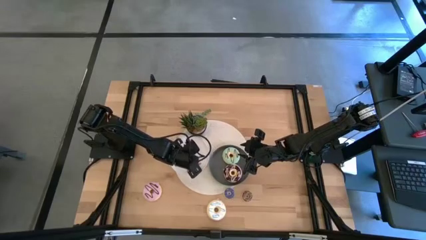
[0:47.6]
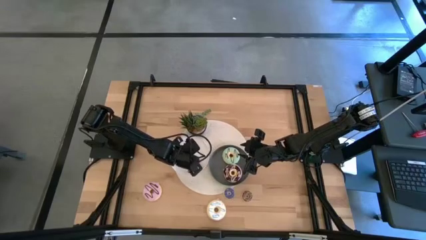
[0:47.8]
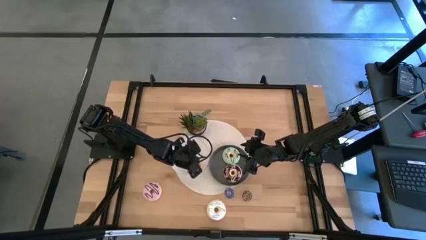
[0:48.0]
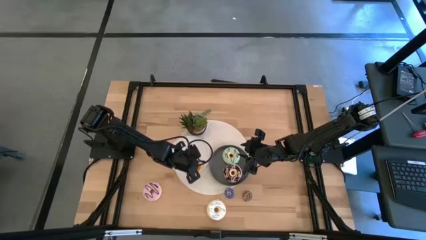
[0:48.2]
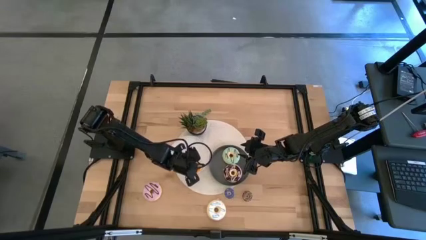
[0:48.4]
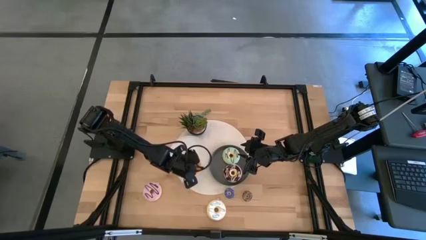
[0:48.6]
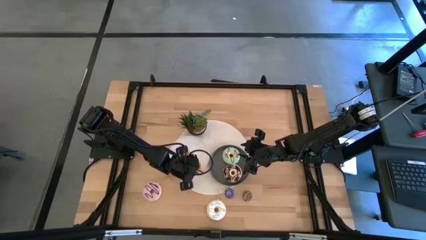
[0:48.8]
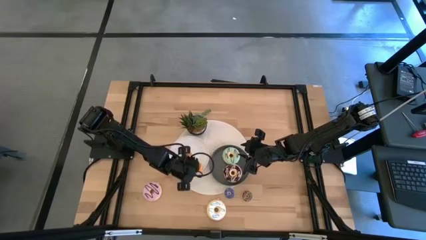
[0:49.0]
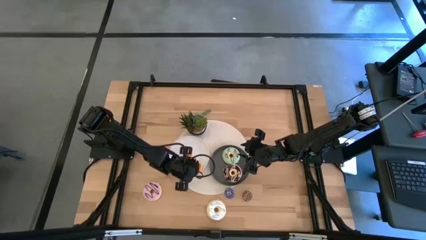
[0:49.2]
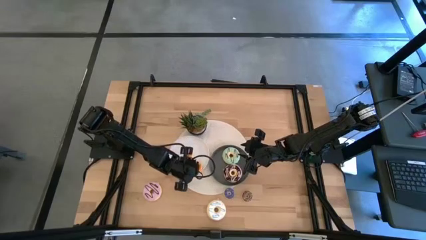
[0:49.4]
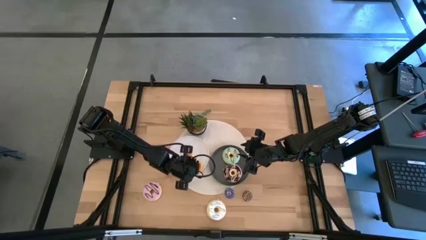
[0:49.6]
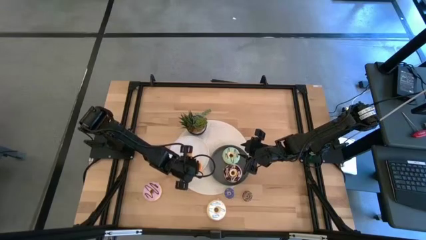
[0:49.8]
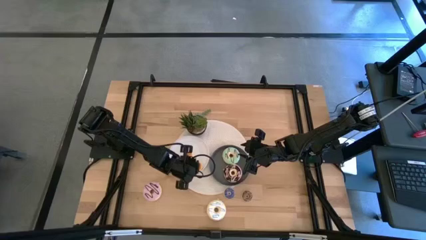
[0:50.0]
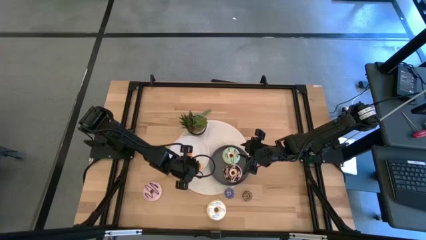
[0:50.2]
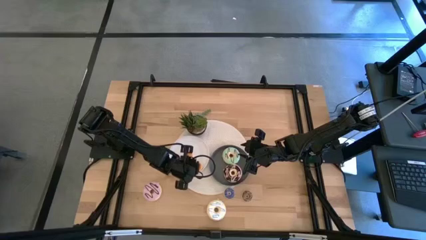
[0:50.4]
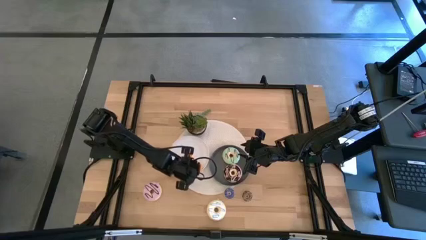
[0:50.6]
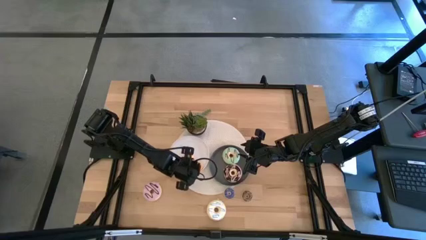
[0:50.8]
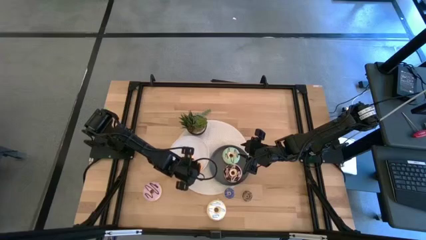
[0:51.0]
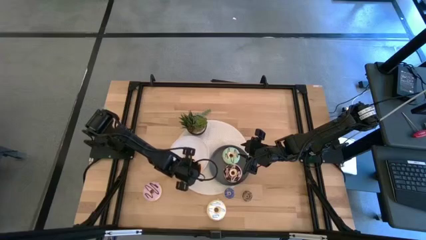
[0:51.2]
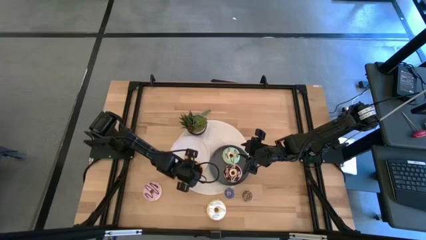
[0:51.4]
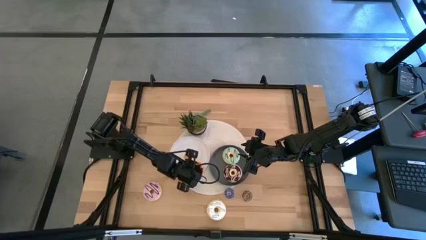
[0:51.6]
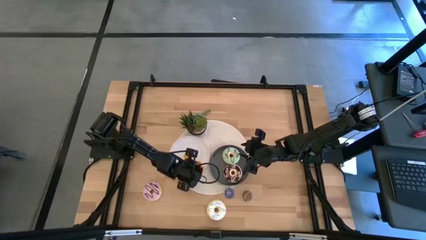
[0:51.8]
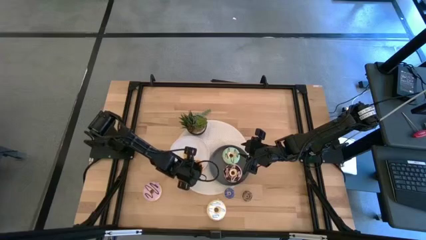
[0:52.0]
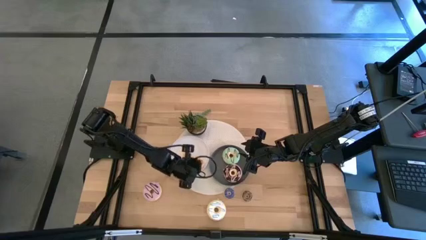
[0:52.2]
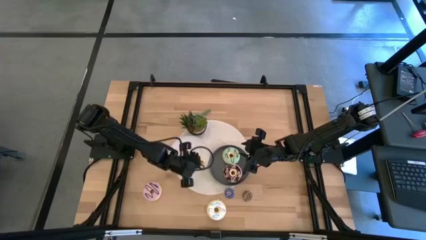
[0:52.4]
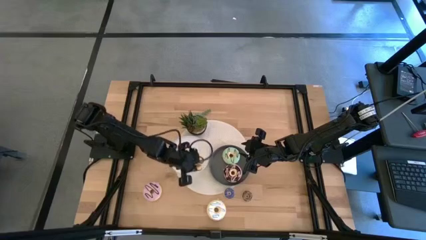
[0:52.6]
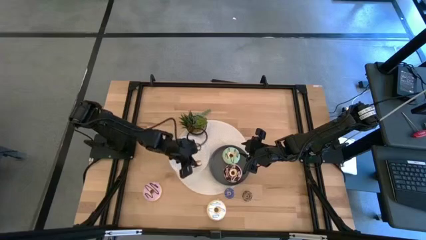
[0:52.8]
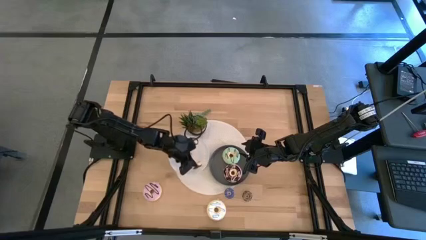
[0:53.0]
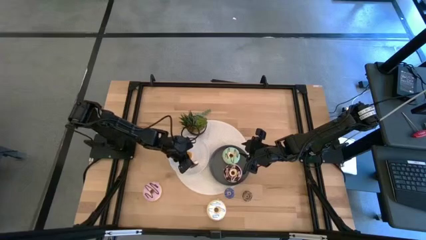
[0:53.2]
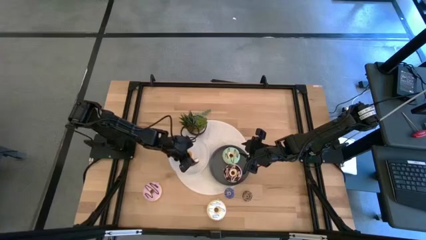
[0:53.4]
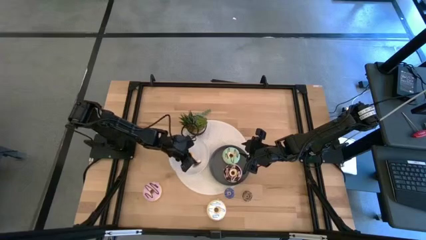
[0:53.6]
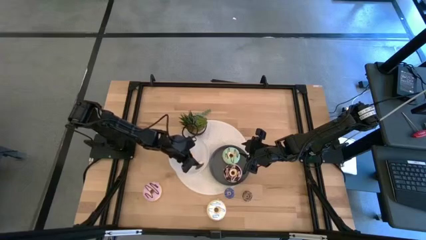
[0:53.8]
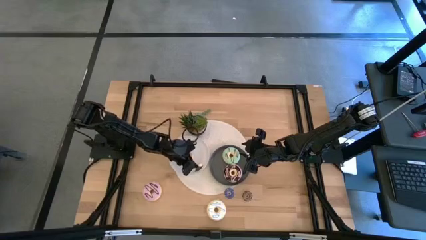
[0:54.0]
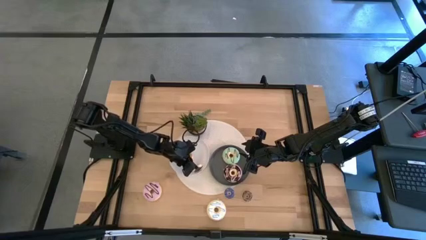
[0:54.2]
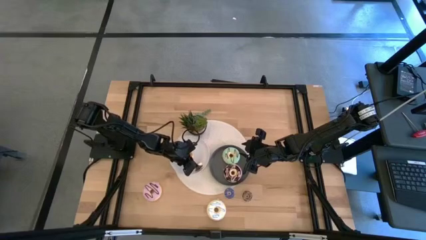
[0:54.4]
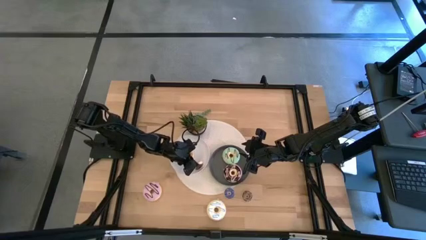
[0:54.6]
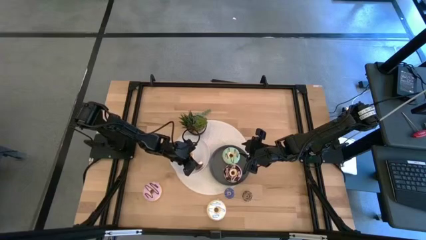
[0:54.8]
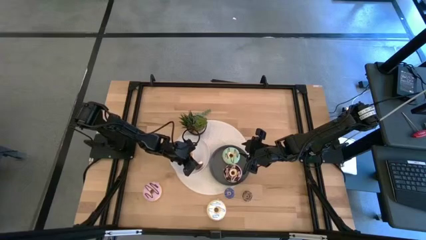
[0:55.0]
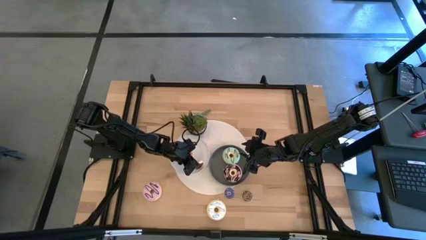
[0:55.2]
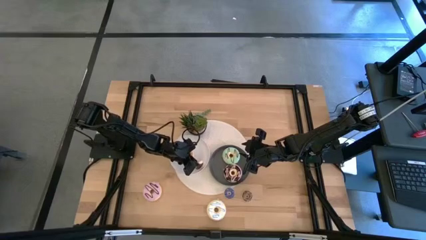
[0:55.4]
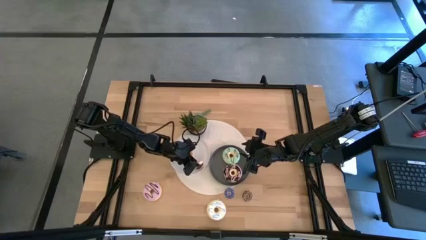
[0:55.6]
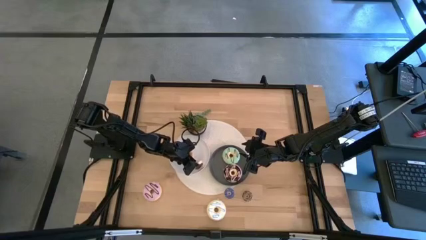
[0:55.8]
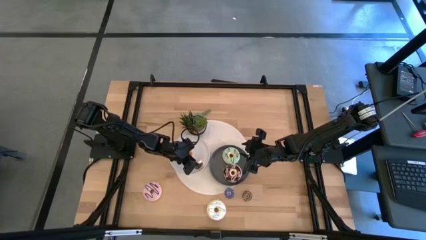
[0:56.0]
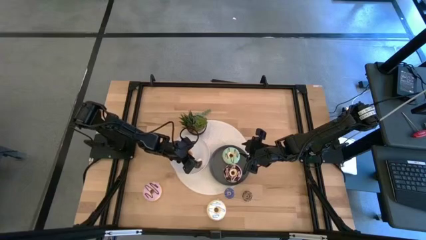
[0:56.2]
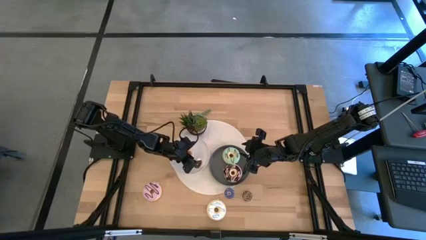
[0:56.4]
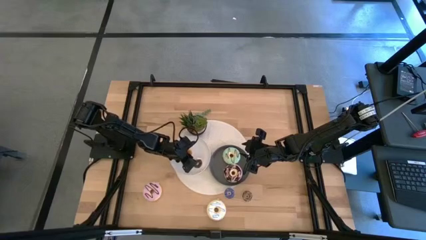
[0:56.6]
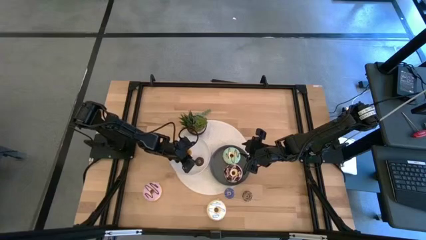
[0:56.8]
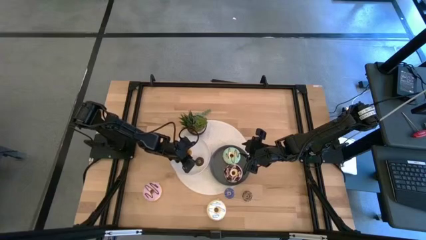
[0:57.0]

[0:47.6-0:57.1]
Task: Pick & Place donuts
Put the small black donut on the white plate
